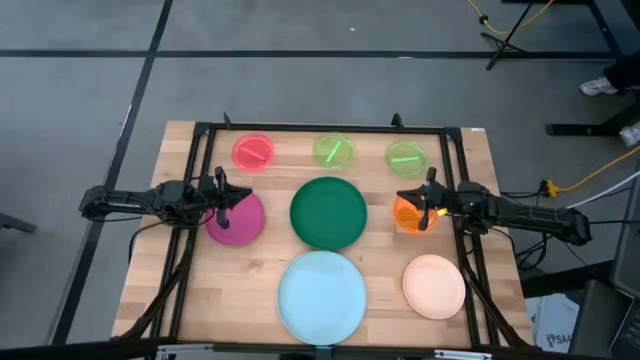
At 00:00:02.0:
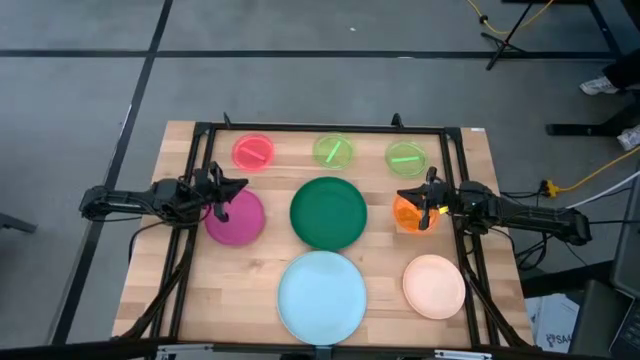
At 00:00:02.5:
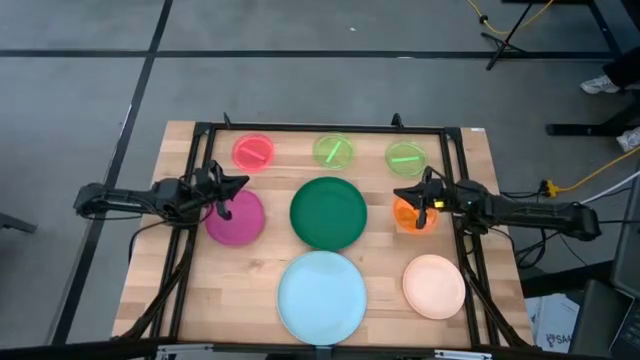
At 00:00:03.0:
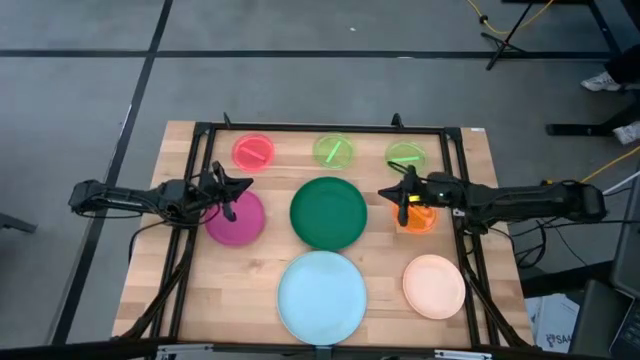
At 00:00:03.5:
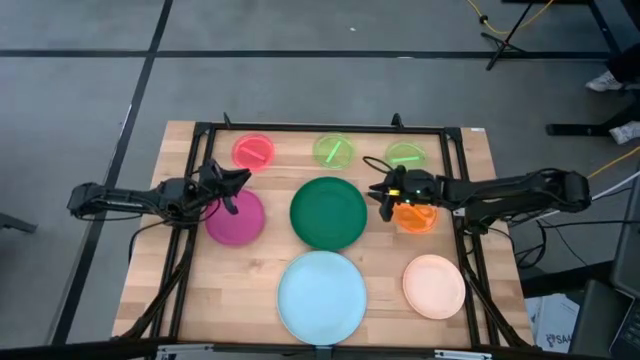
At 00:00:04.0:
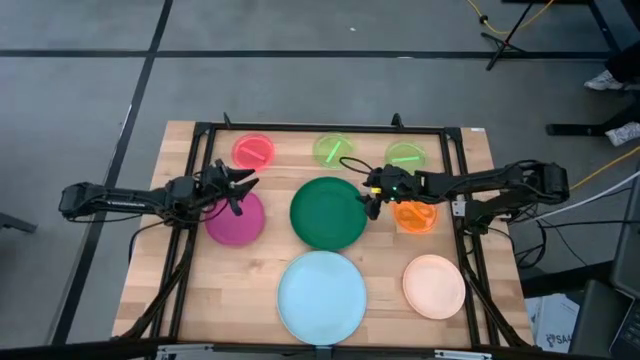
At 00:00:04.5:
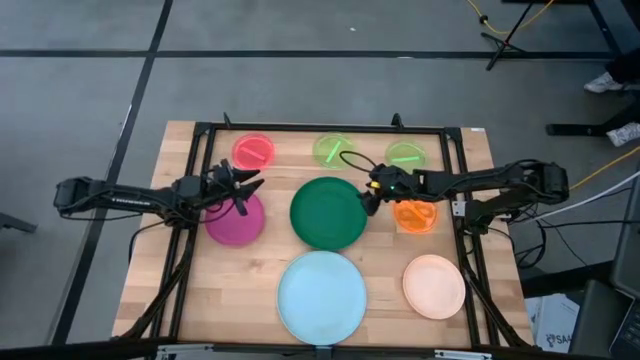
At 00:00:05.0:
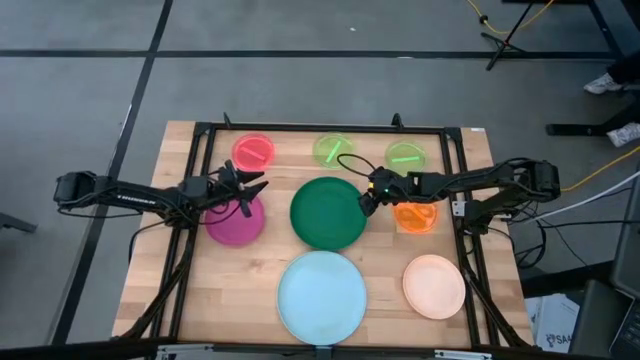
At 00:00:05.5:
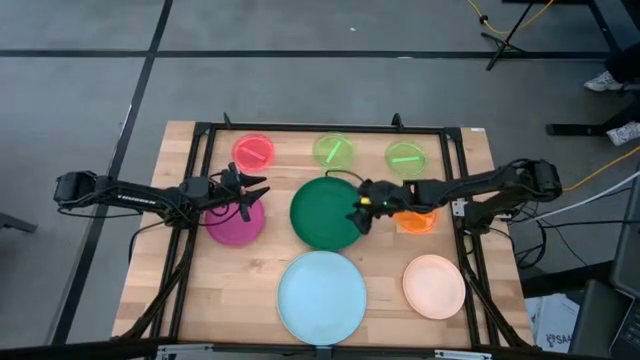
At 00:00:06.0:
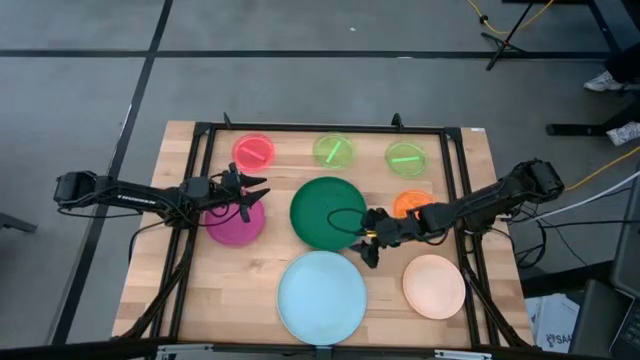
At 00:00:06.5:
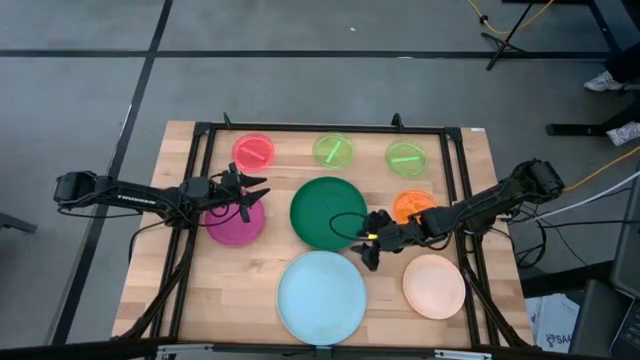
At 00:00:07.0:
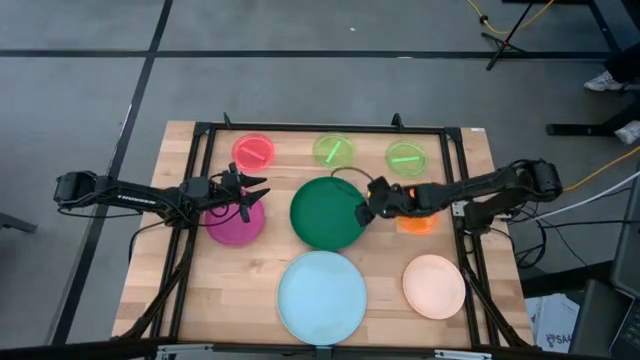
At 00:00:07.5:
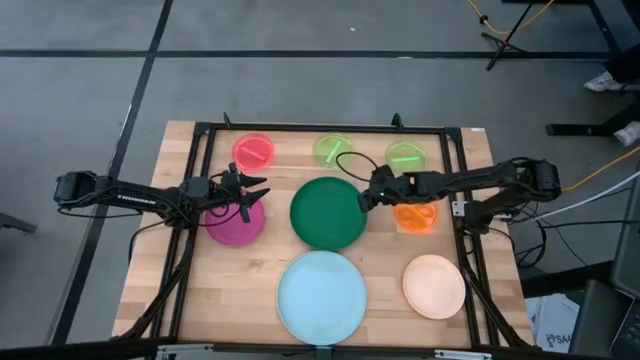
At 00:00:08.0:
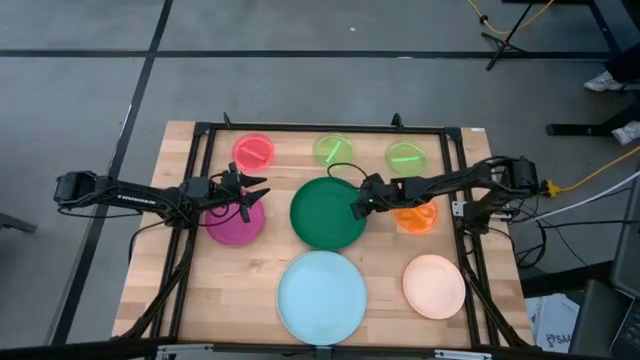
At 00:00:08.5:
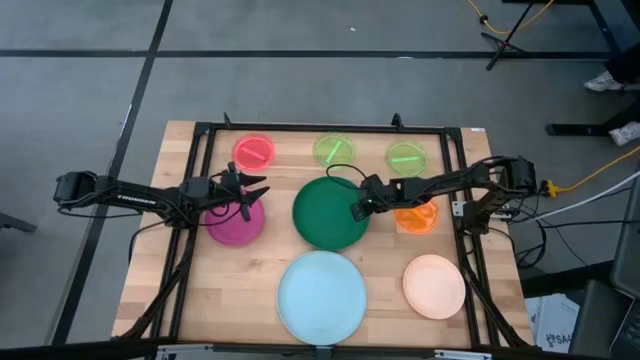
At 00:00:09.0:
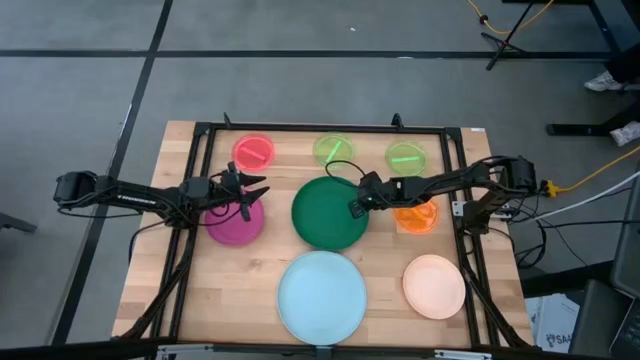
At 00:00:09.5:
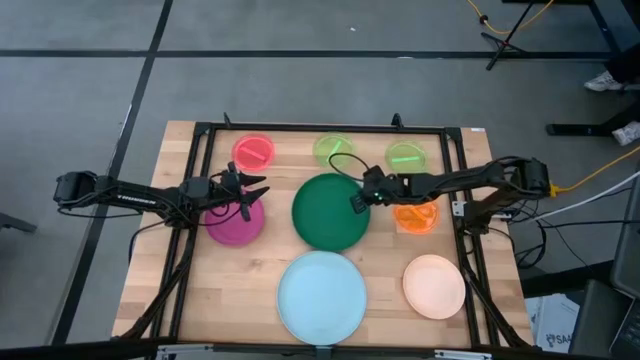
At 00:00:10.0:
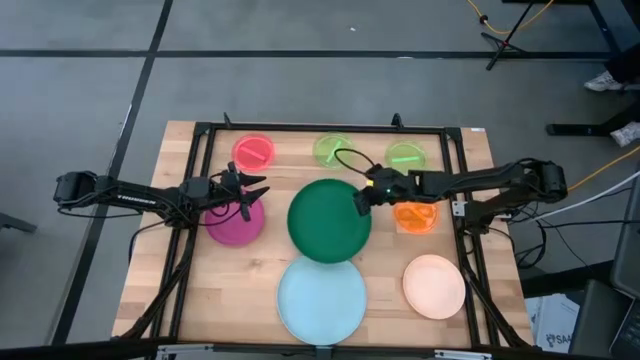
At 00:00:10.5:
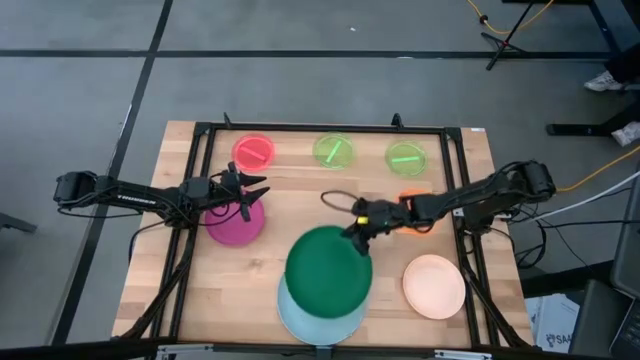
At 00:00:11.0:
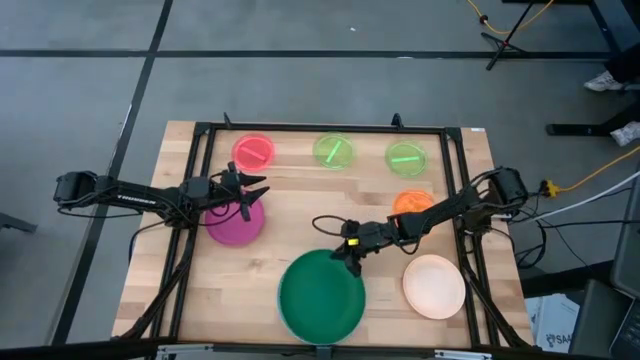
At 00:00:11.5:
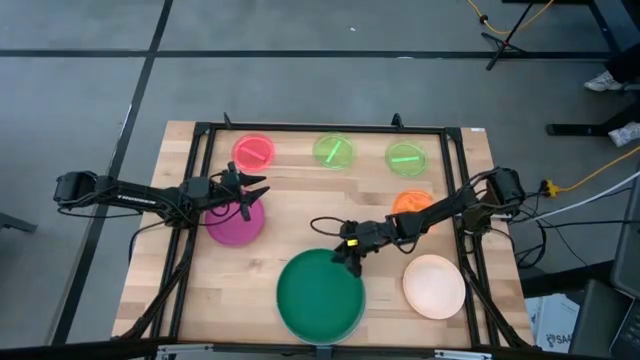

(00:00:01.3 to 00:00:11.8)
Task: Stack plastic plates
Stack the green plate on top of the blue plate

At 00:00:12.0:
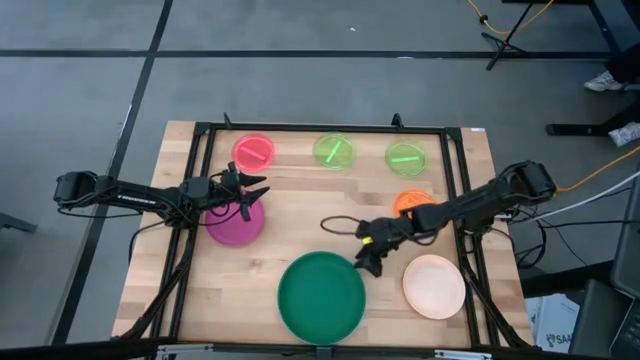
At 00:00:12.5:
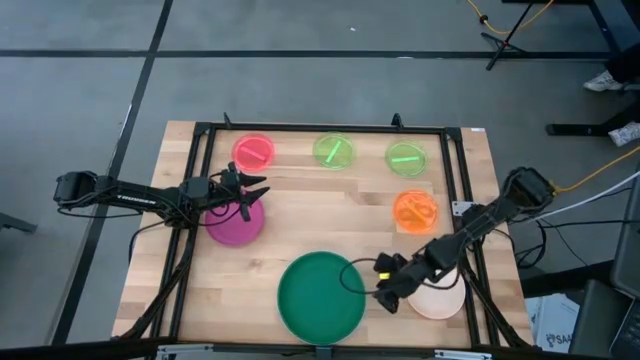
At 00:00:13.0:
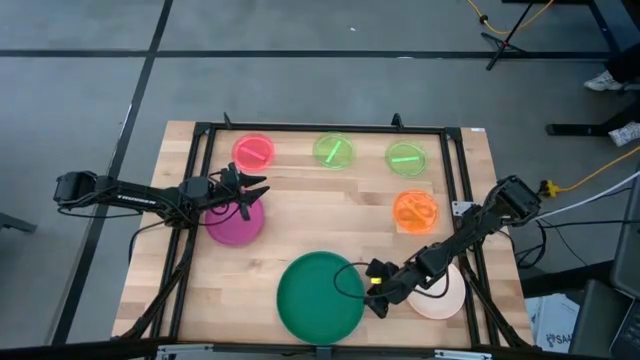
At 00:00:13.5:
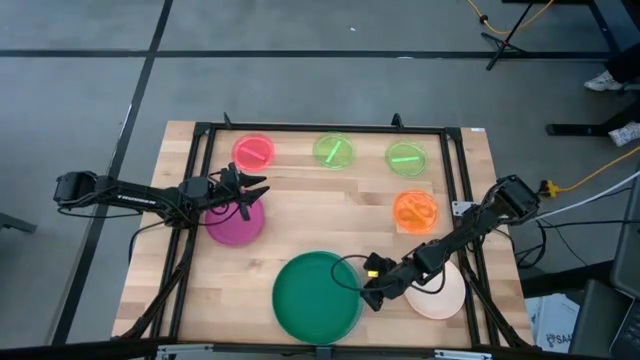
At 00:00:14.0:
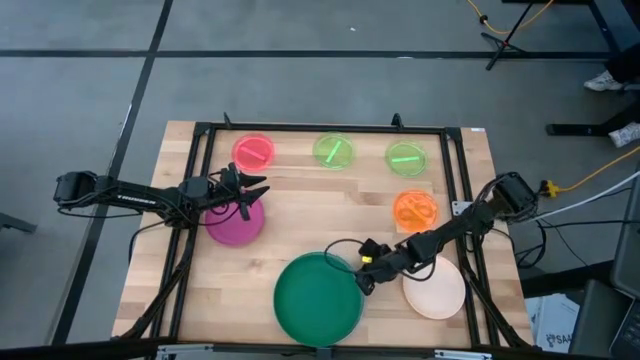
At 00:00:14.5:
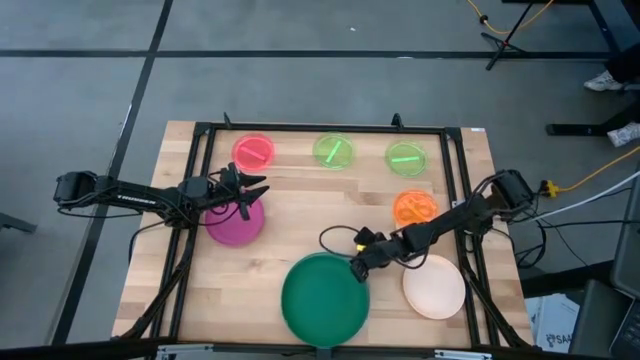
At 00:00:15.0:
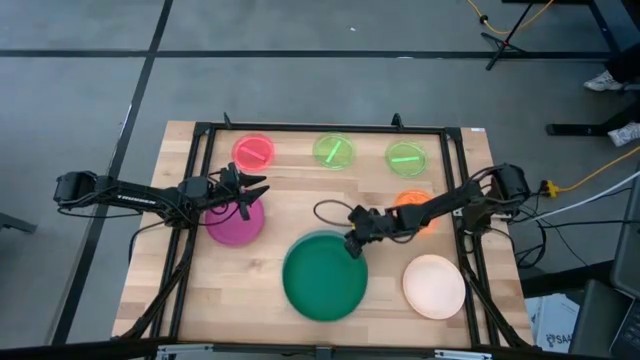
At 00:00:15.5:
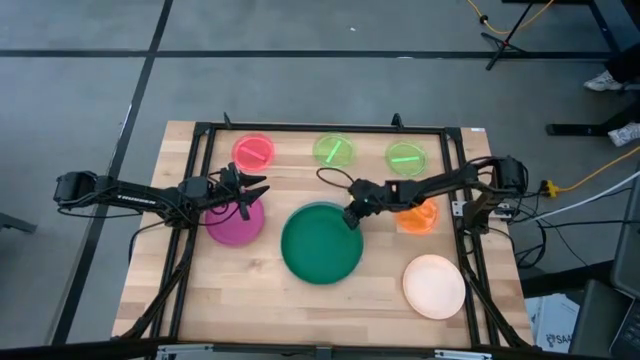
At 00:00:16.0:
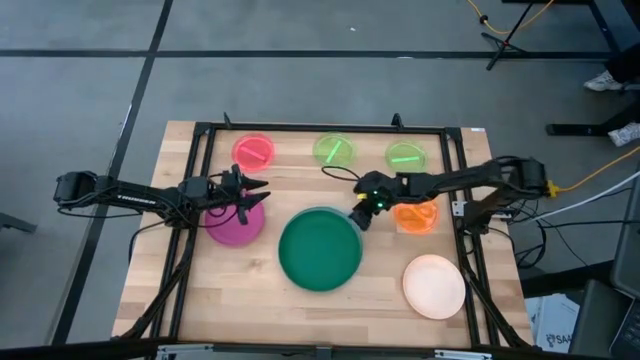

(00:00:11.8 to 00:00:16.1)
Move the stacked plates to the center of the table

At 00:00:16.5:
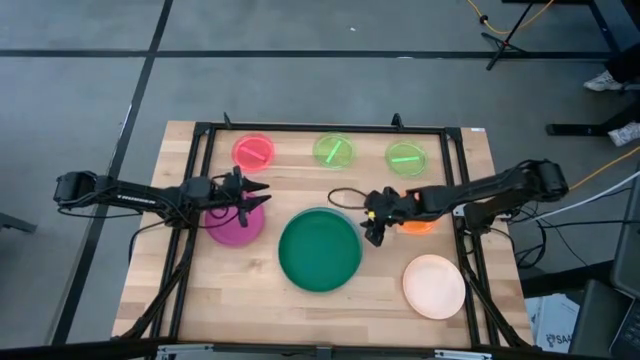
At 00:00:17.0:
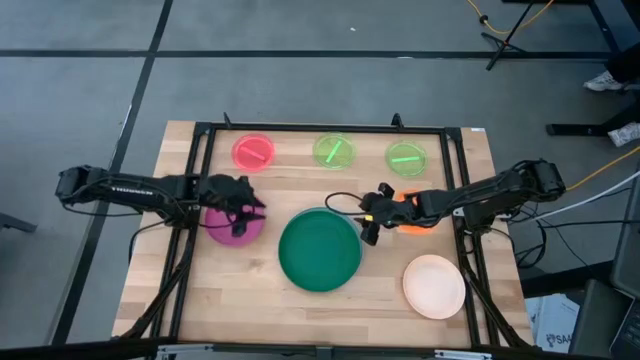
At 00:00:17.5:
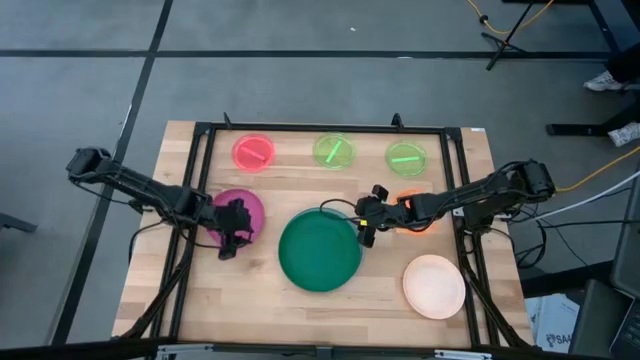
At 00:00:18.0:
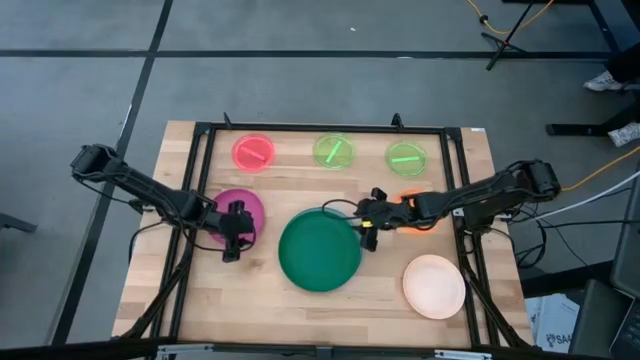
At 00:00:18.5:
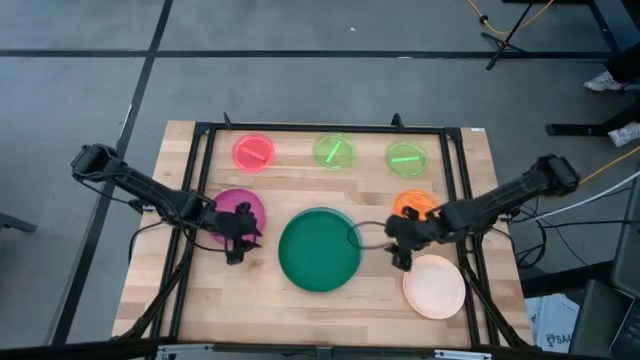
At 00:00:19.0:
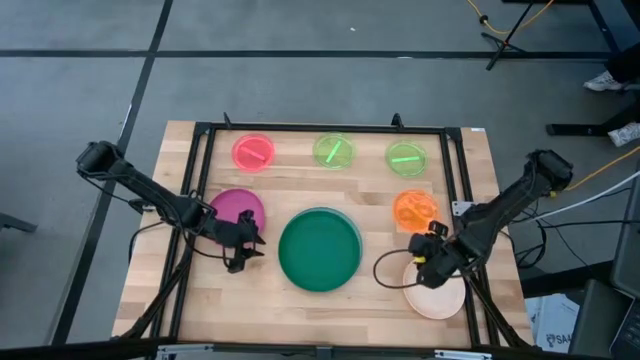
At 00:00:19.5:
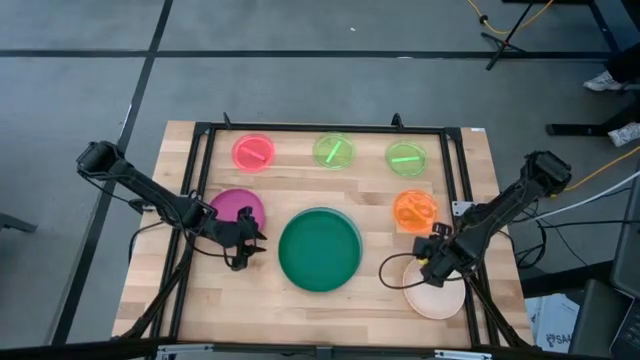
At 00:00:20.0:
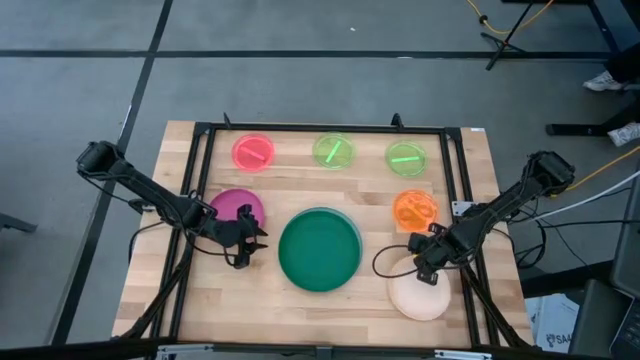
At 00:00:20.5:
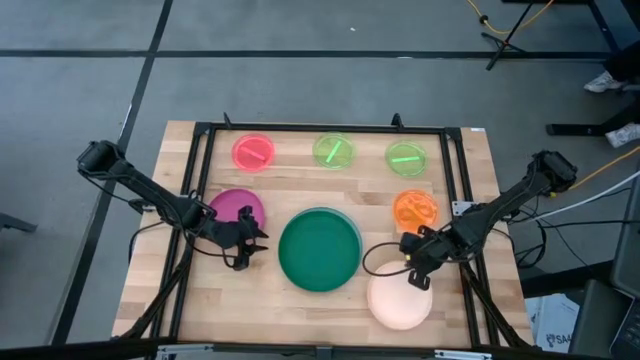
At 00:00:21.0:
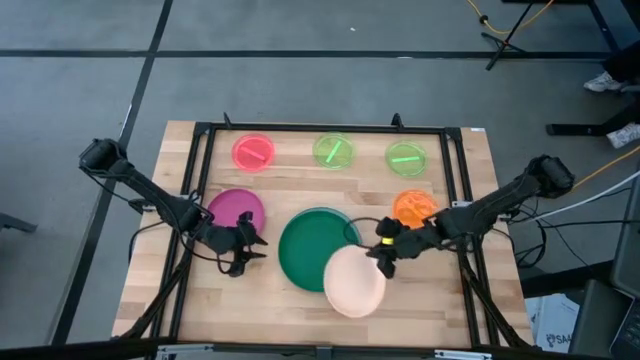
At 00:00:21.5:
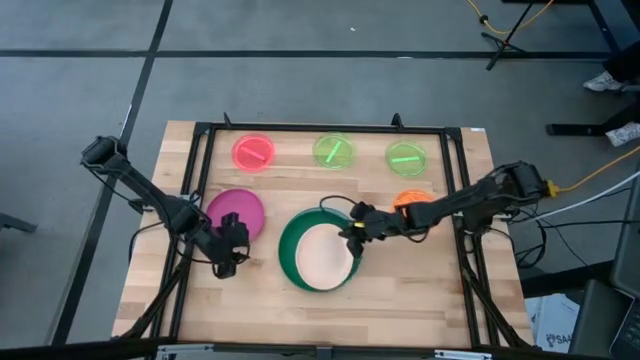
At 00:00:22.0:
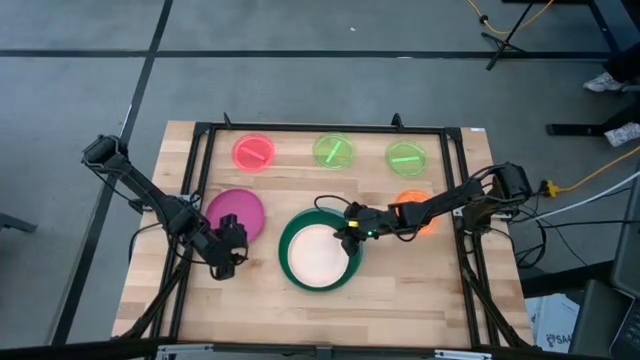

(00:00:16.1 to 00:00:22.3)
Stack the light orange plate on top of the green plate

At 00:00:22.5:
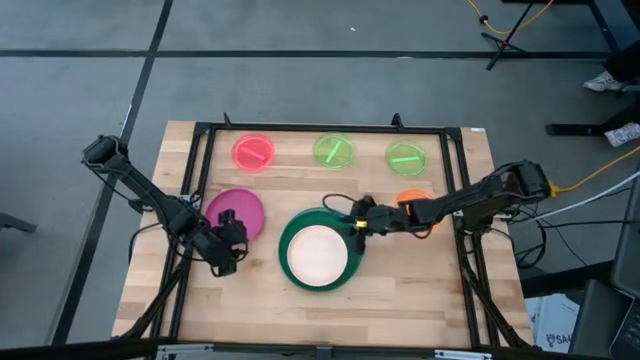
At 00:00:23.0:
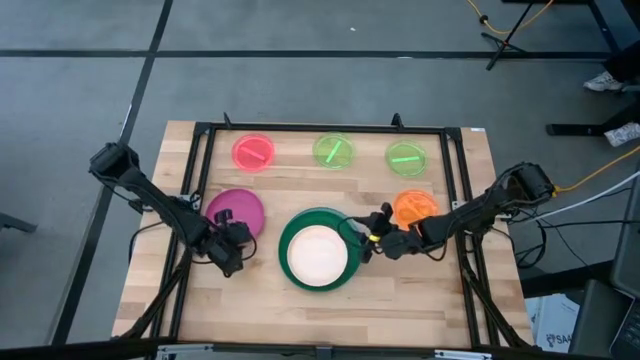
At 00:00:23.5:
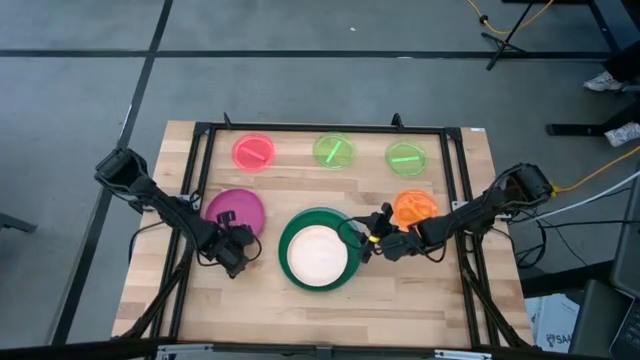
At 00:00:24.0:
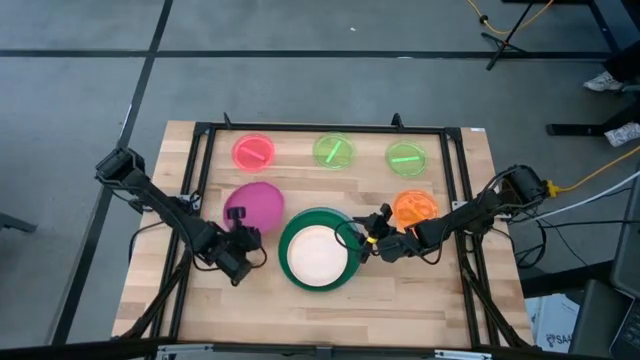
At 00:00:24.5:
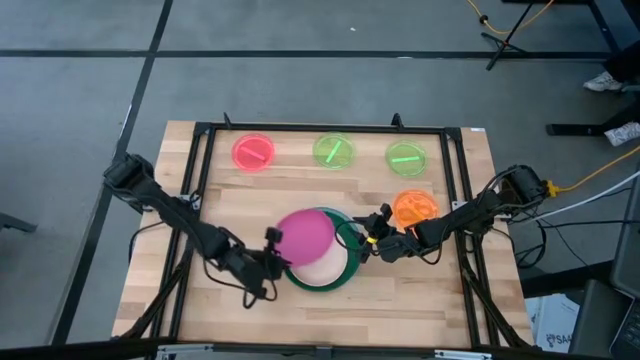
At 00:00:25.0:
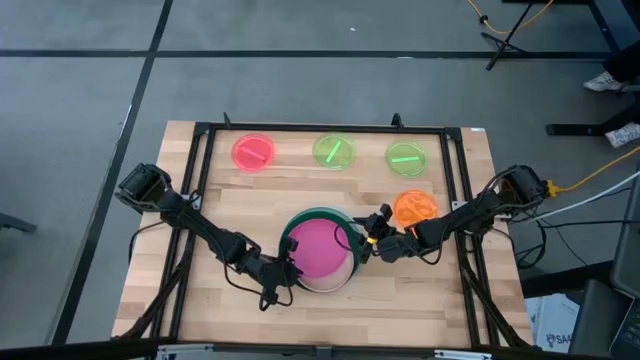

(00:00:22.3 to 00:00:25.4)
Stack the dark pink plate on top of the light orange plate
